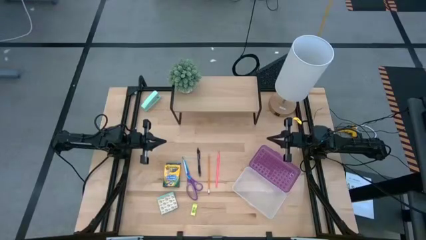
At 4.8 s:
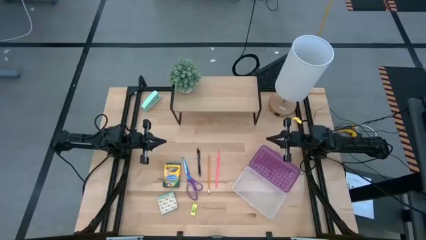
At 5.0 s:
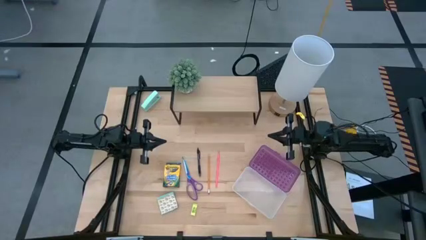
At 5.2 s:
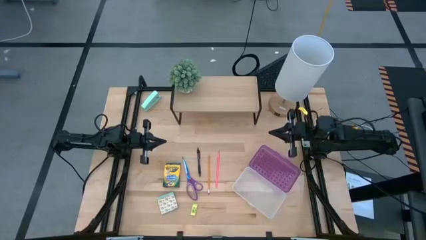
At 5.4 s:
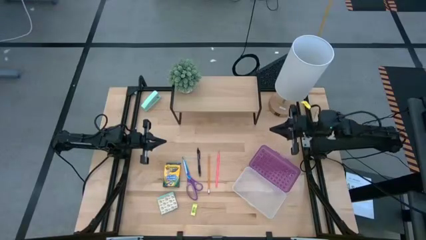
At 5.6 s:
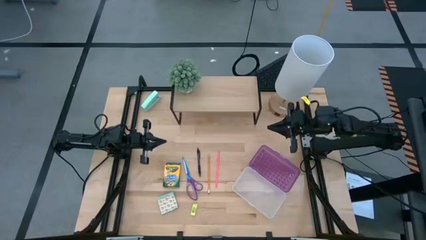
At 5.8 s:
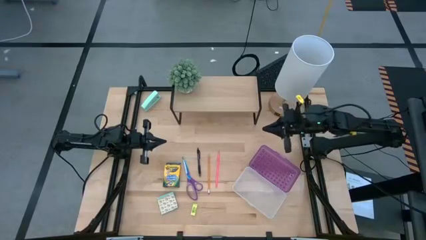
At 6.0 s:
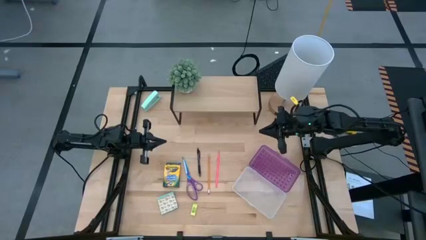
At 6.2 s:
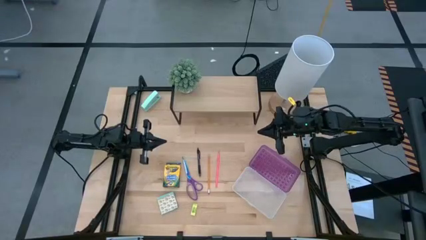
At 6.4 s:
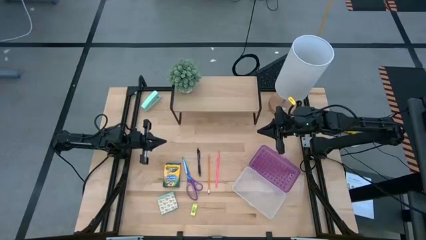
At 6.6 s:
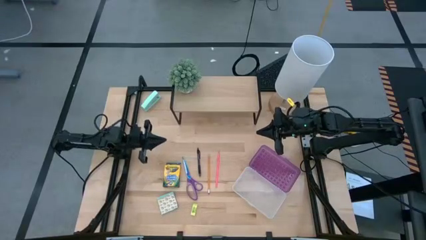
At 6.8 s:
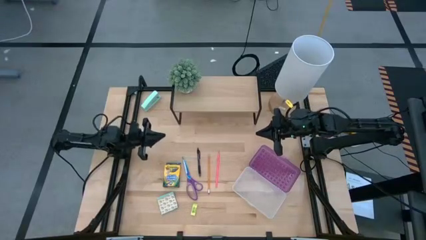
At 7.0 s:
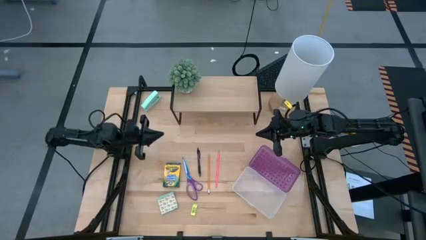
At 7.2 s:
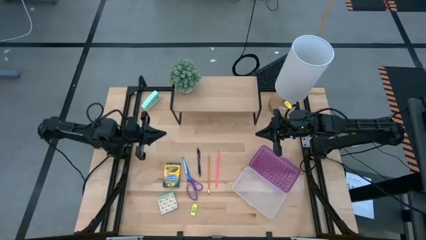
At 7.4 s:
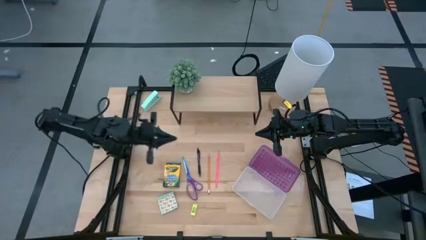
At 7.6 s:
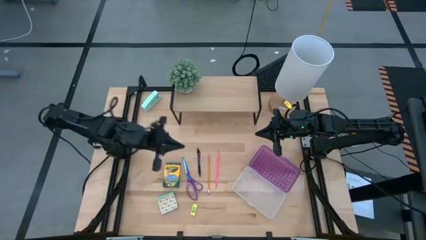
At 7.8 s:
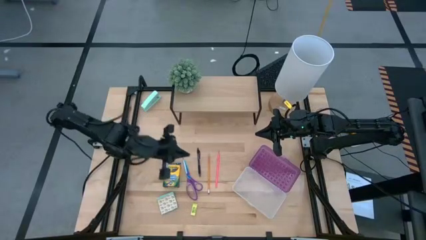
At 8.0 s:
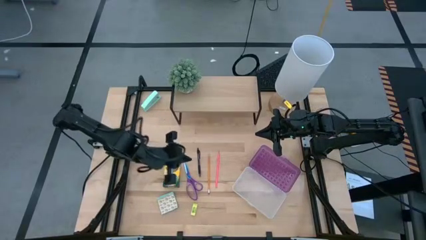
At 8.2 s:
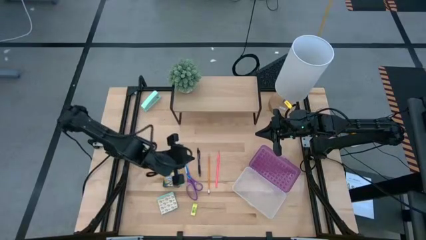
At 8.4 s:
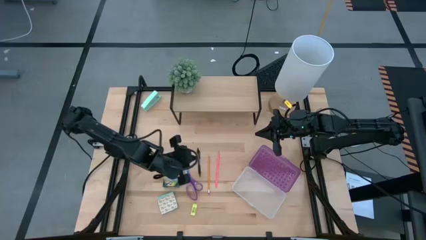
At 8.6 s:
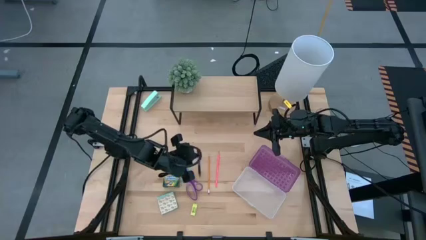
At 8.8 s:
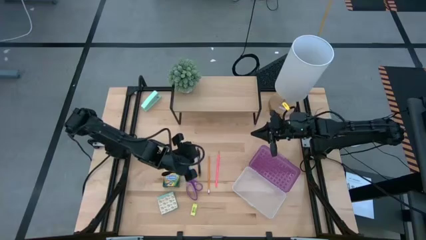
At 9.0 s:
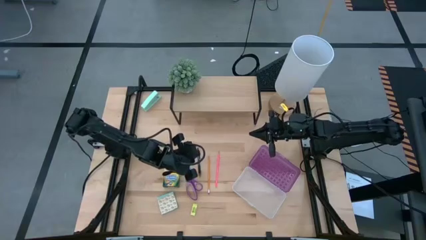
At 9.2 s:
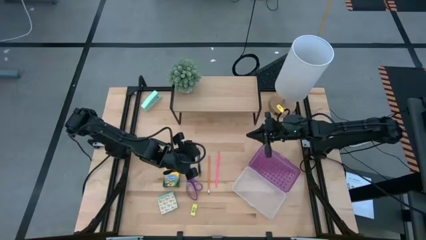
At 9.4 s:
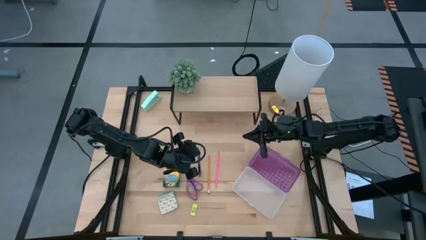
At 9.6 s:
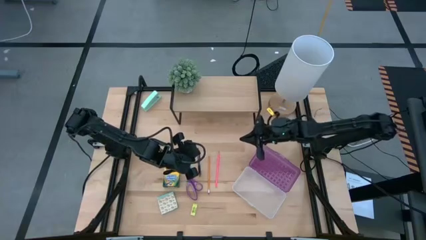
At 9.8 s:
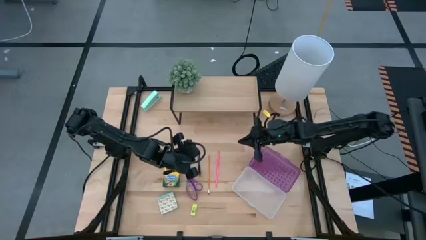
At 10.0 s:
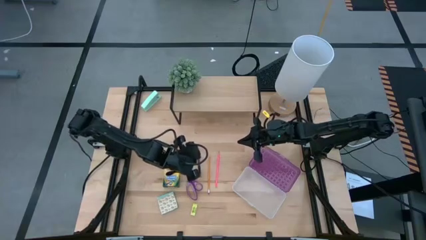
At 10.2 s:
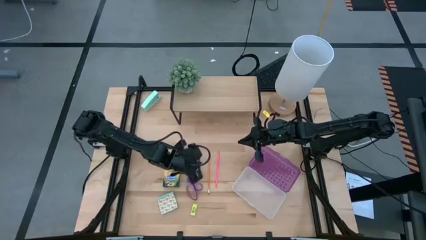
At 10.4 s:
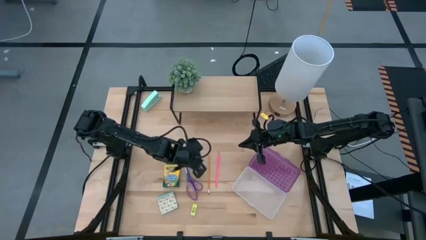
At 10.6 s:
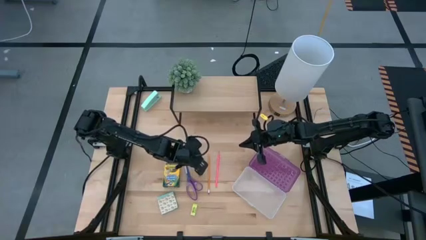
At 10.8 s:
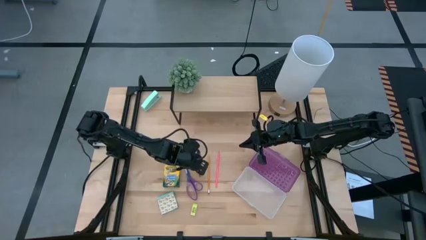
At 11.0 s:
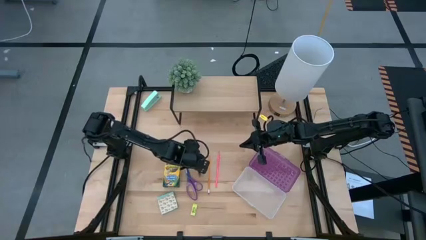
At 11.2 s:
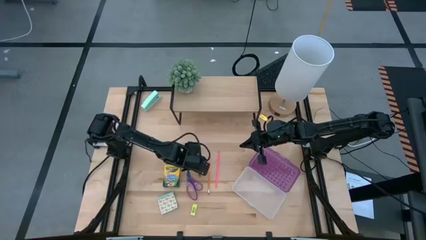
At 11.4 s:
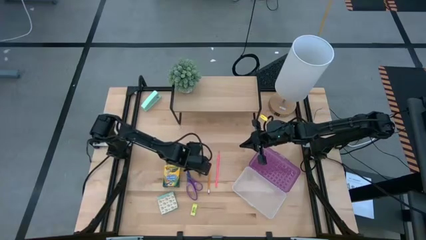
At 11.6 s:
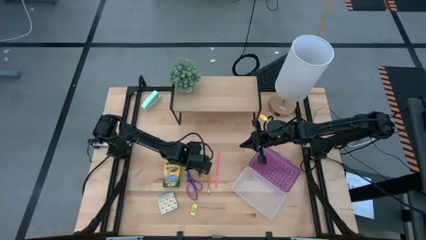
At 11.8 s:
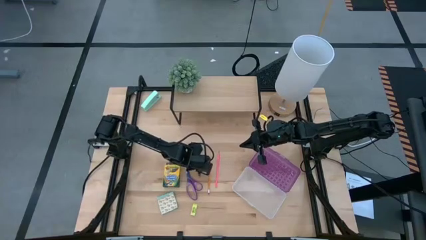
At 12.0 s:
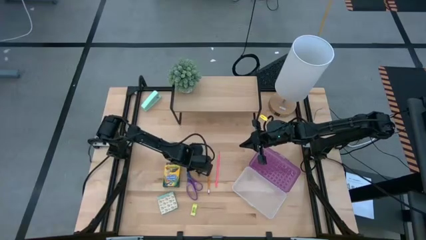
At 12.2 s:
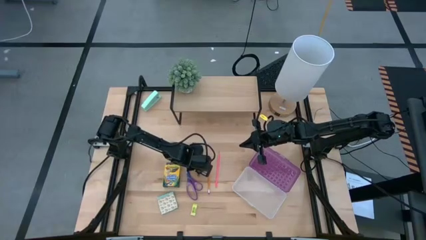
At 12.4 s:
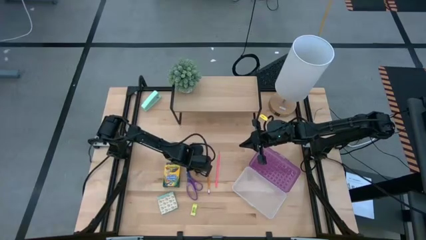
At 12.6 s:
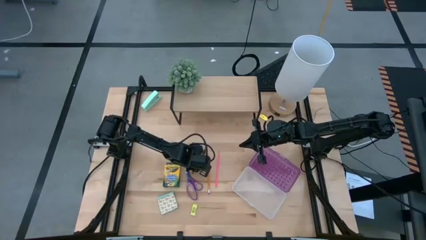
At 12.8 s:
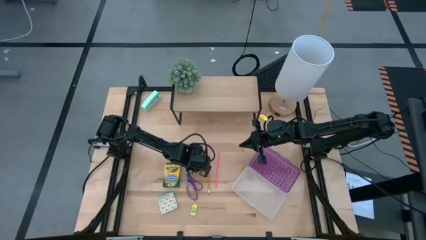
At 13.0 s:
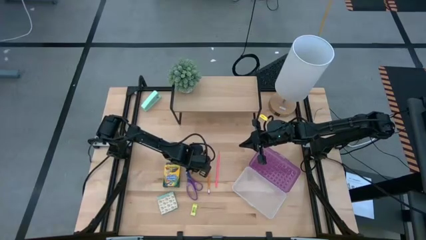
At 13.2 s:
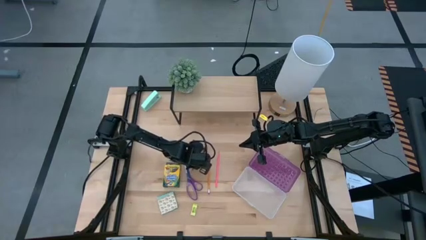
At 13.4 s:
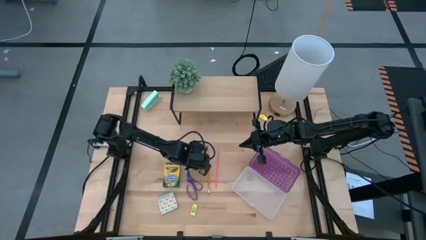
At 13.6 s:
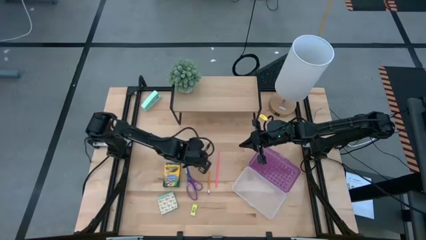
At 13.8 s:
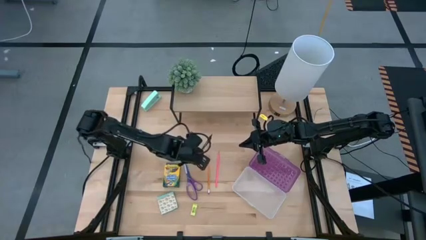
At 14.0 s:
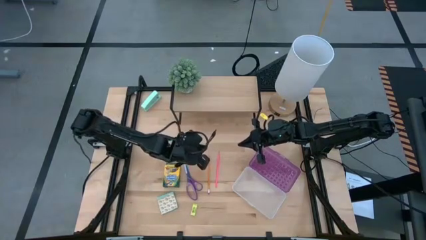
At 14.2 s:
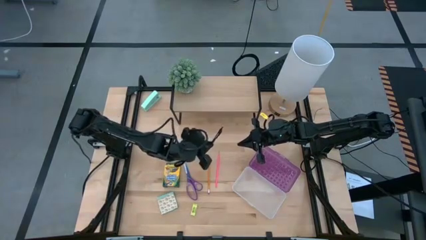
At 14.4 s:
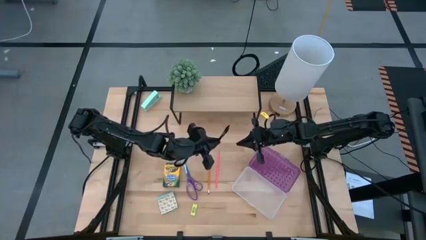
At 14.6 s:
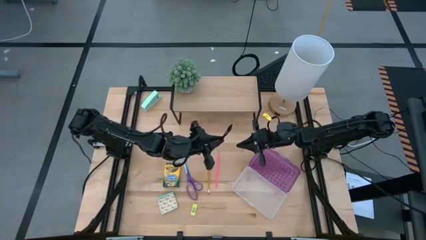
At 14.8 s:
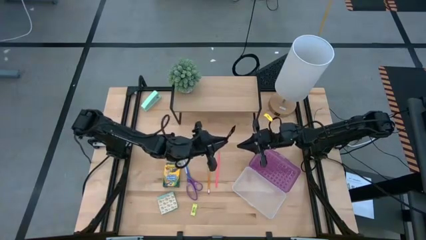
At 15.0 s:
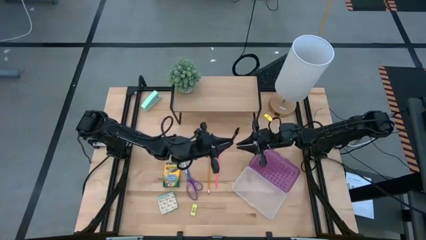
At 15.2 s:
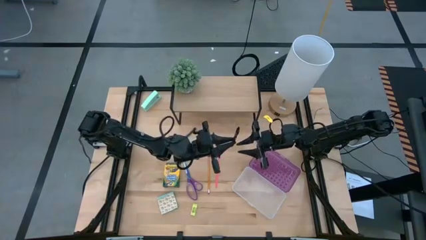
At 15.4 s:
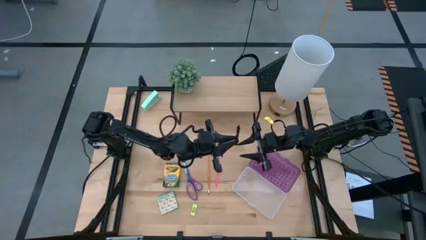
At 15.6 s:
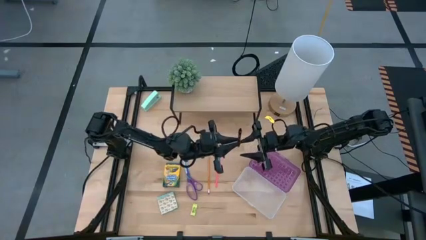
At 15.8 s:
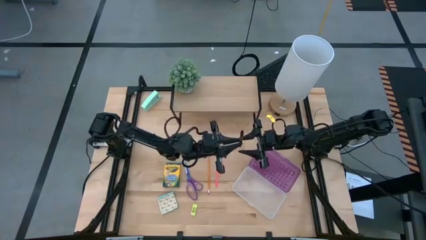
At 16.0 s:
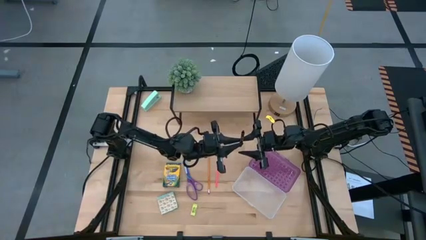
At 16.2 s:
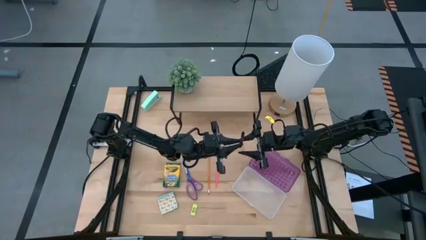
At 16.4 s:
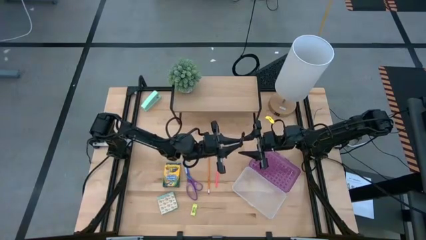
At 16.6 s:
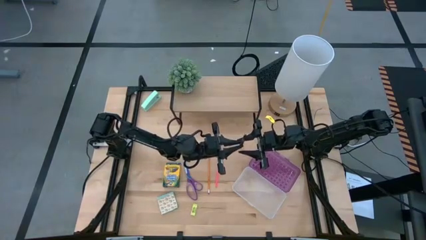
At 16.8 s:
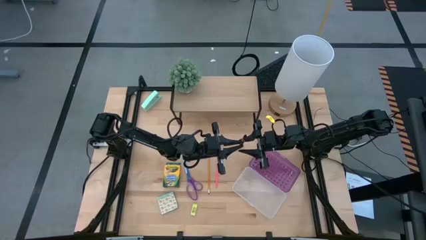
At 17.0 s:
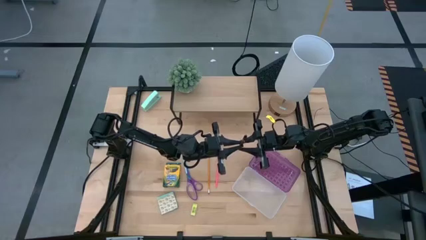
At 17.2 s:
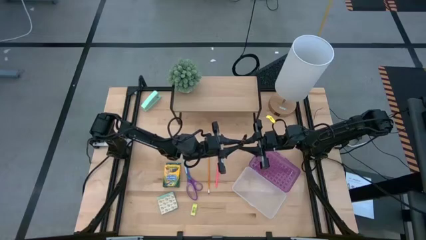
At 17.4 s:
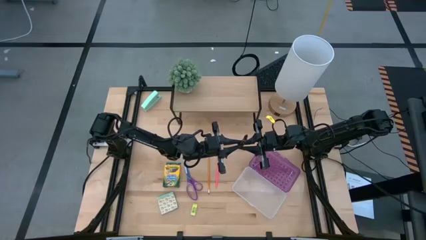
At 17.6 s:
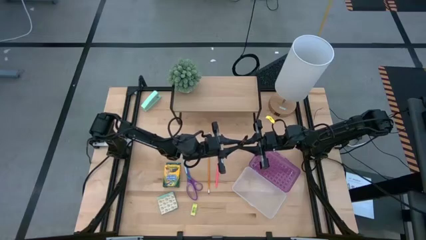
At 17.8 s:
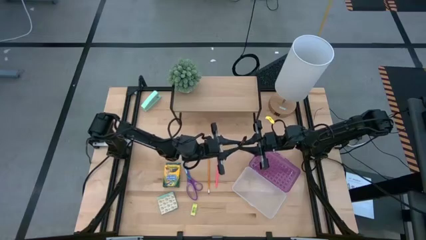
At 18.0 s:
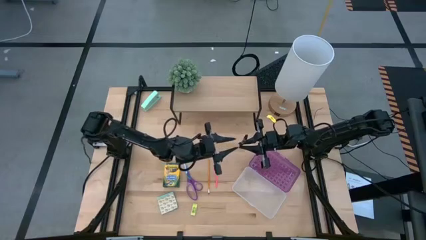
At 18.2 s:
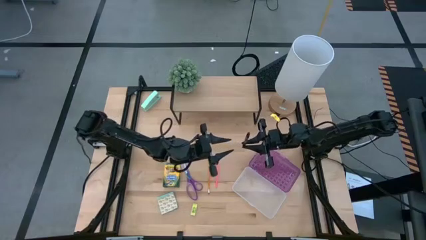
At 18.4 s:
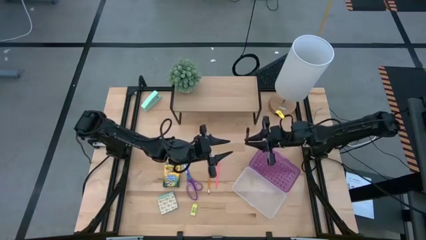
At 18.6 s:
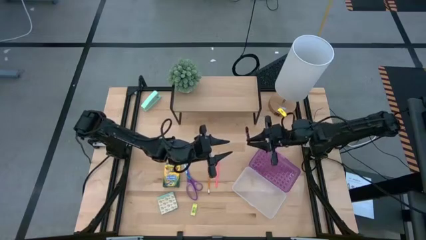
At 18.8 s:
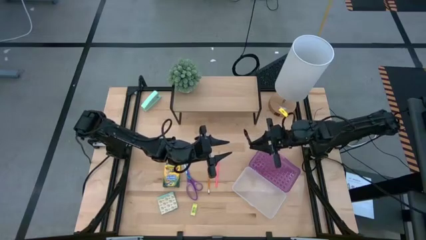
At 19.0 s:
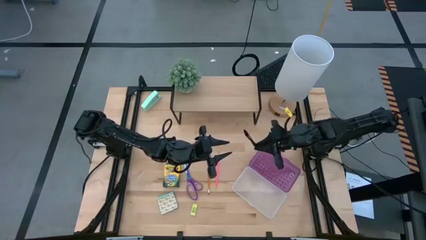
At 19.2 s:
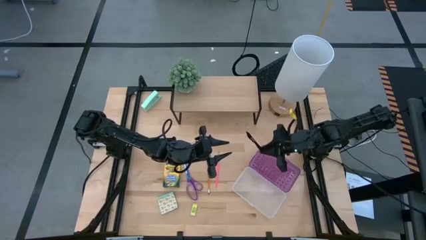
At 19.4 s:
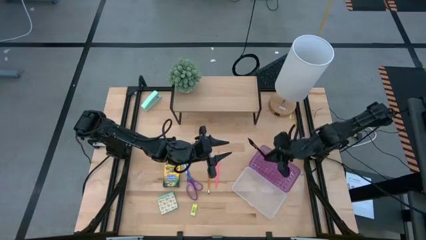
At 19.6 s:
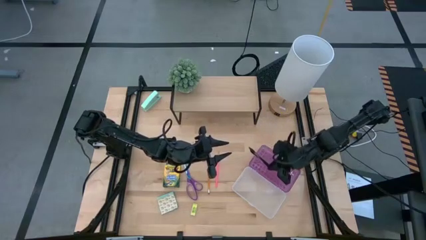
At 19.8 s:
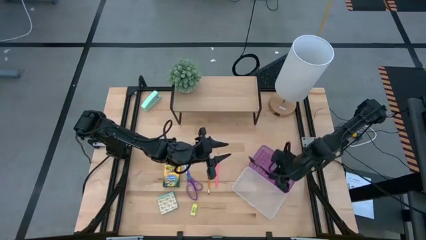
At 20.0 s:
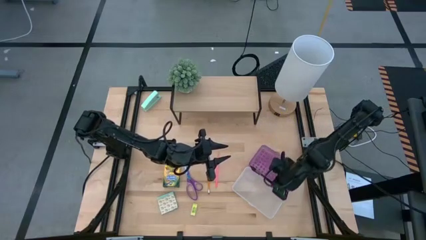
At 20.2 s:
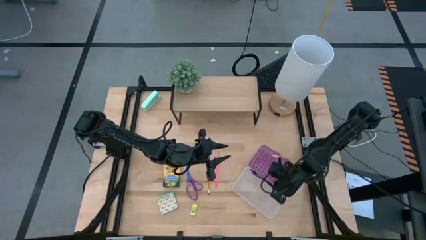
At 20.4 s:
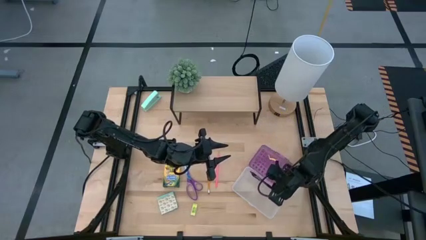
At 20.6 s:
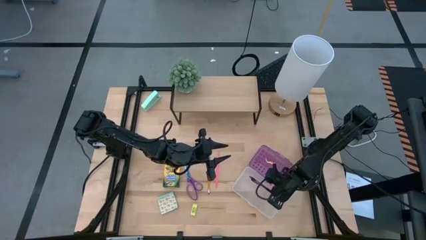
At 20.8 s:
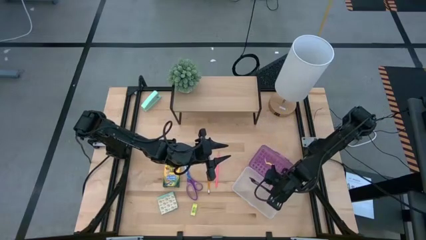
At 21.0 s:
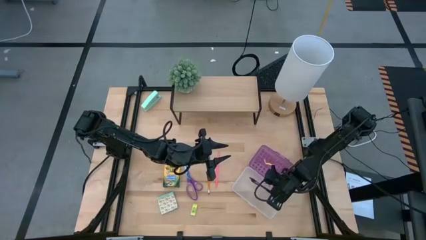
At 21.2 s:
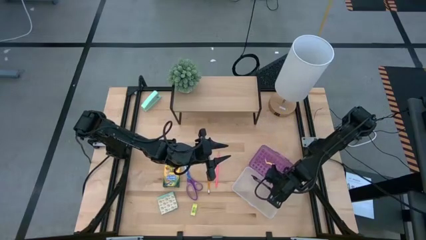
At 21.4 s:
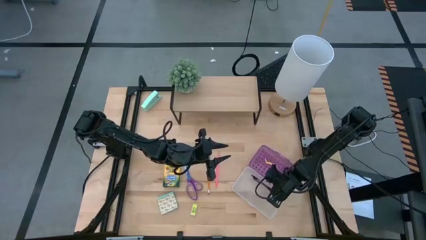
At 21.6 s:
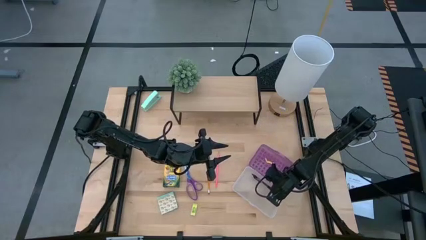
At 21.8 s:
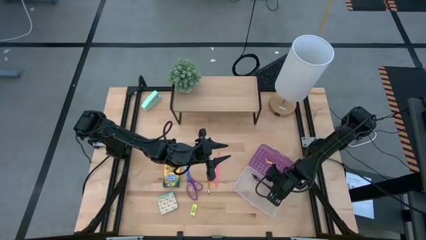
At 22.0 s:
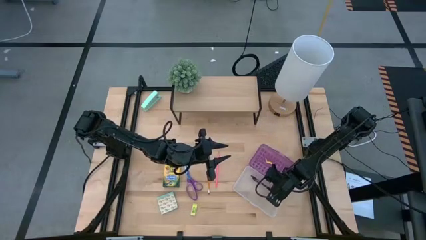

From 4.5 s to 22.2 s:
Task: Pack school essentials
Put the black pen into the purple supply box
